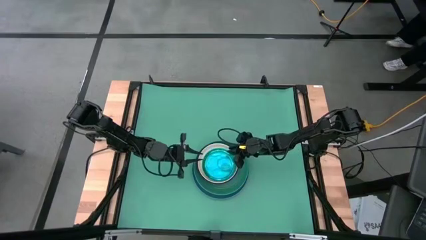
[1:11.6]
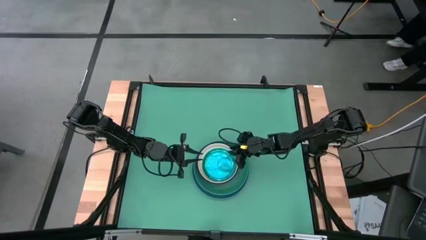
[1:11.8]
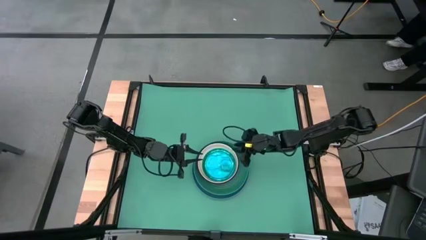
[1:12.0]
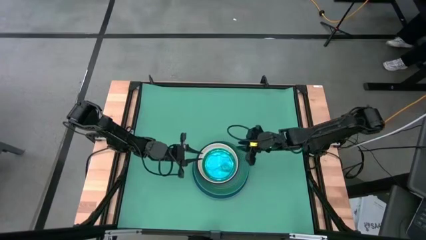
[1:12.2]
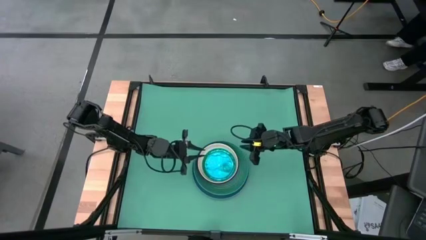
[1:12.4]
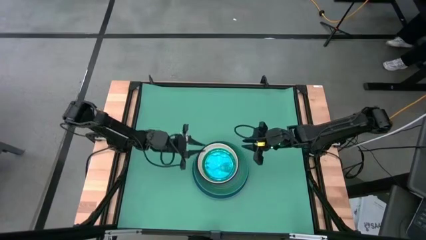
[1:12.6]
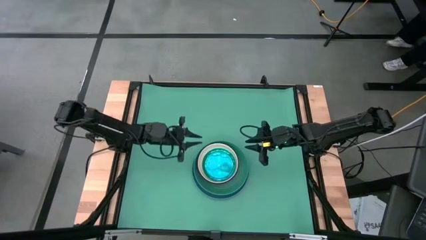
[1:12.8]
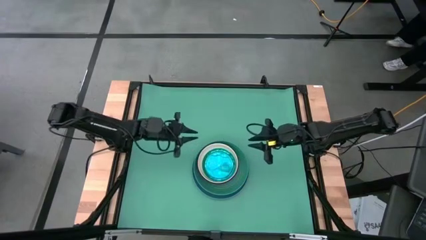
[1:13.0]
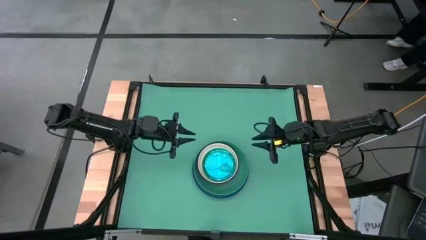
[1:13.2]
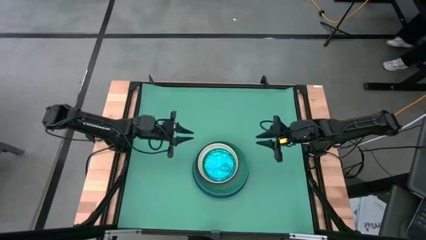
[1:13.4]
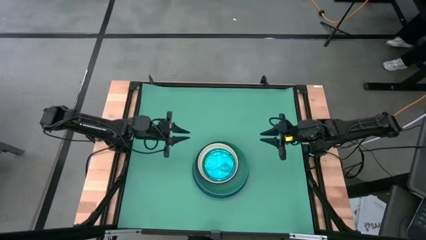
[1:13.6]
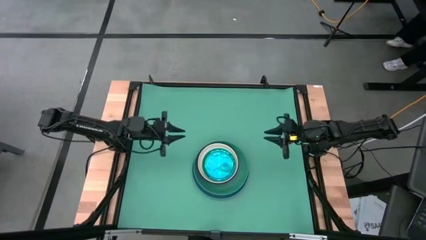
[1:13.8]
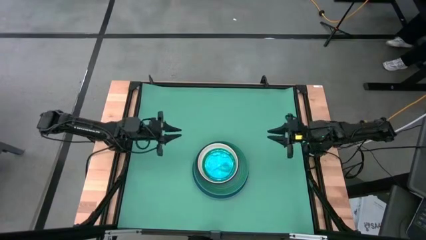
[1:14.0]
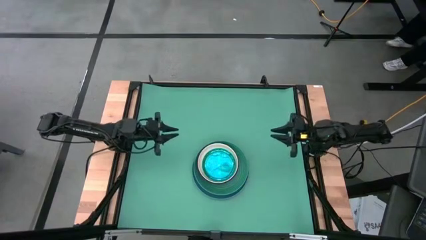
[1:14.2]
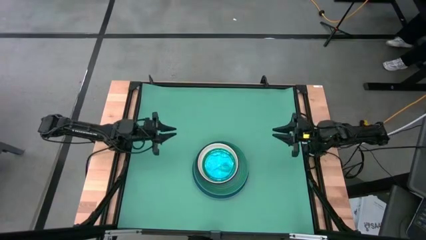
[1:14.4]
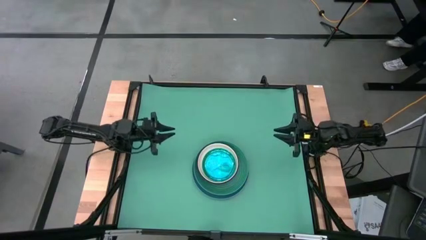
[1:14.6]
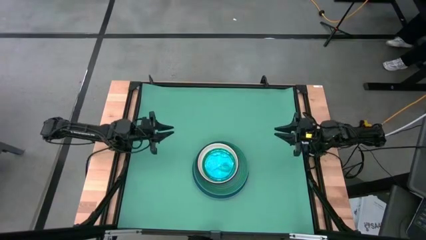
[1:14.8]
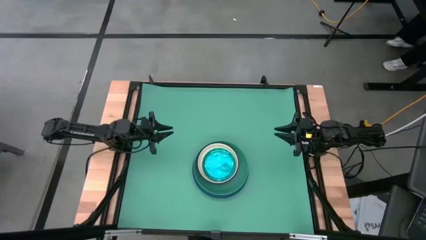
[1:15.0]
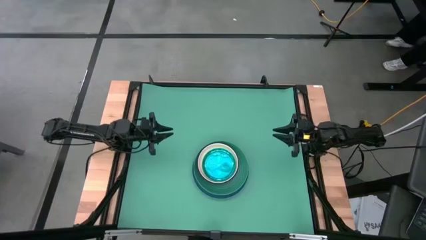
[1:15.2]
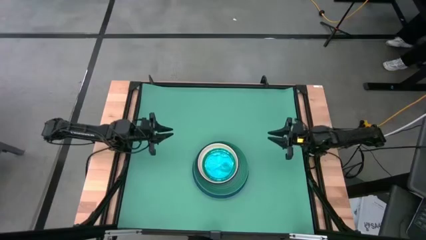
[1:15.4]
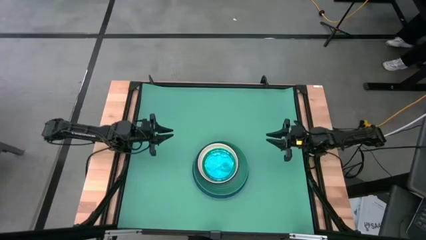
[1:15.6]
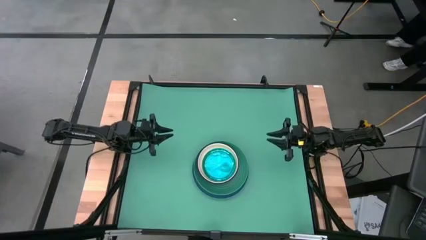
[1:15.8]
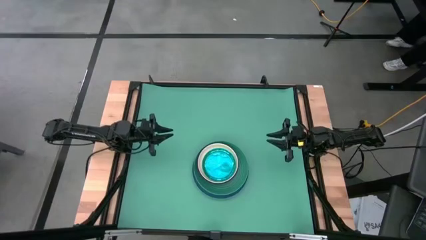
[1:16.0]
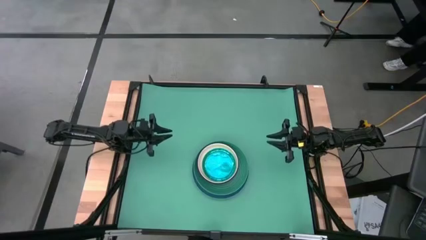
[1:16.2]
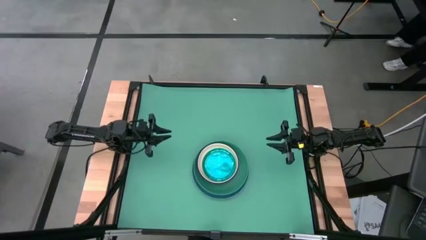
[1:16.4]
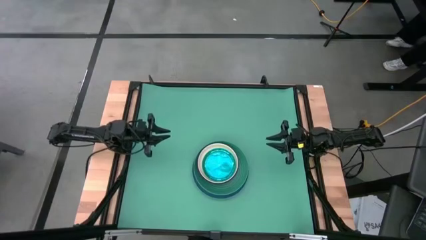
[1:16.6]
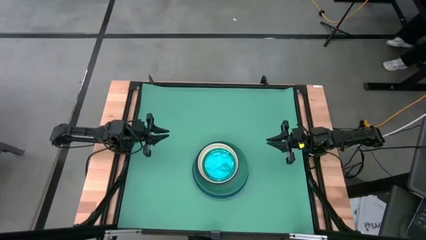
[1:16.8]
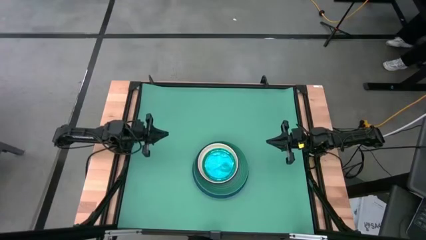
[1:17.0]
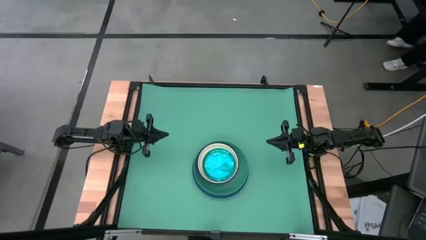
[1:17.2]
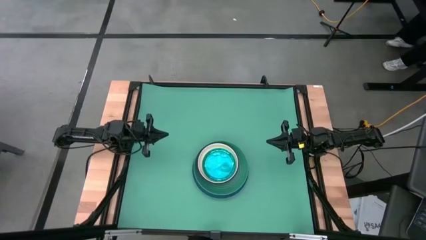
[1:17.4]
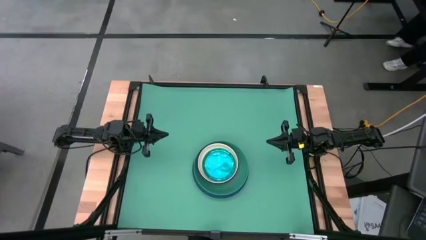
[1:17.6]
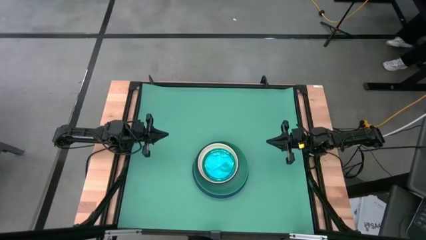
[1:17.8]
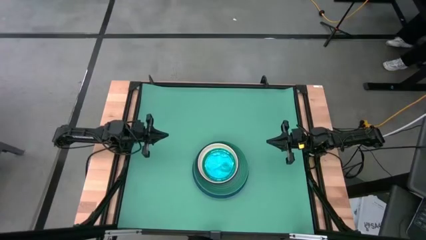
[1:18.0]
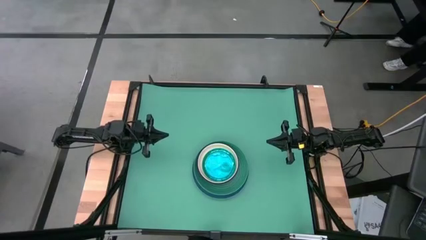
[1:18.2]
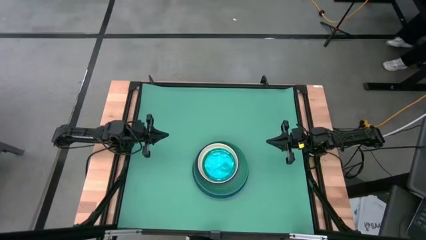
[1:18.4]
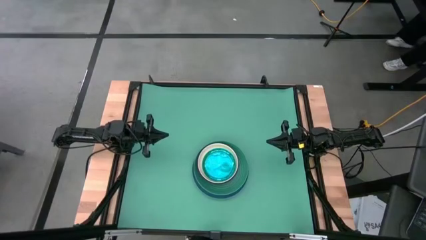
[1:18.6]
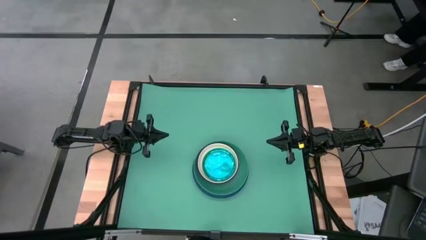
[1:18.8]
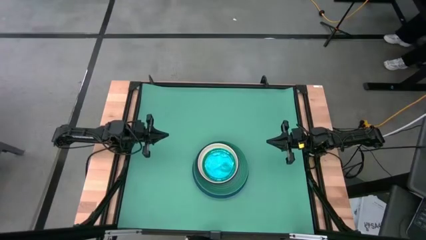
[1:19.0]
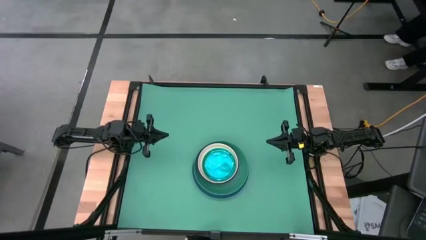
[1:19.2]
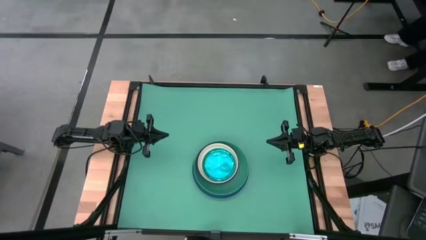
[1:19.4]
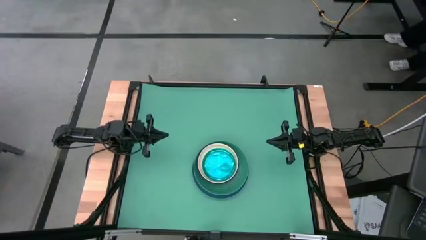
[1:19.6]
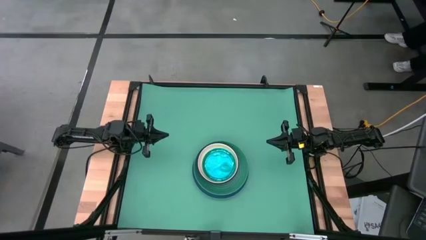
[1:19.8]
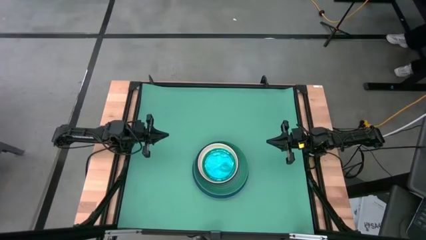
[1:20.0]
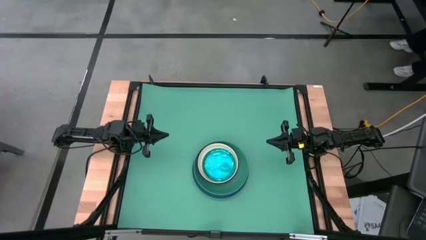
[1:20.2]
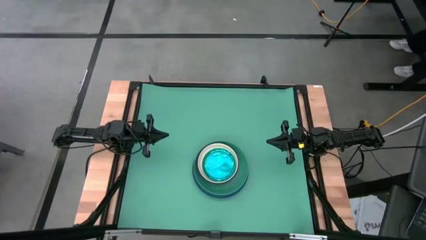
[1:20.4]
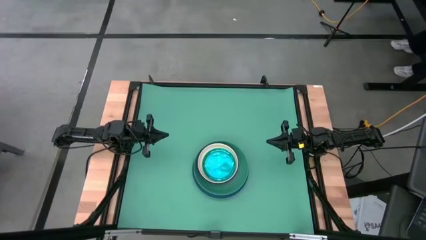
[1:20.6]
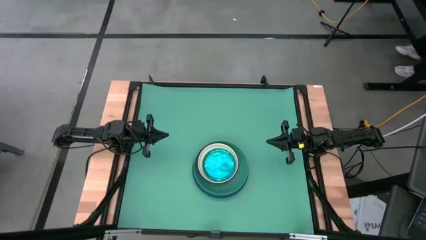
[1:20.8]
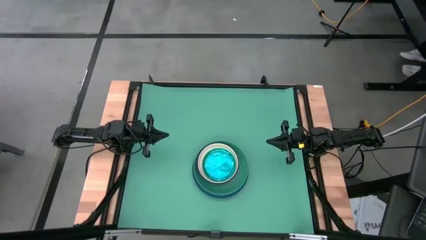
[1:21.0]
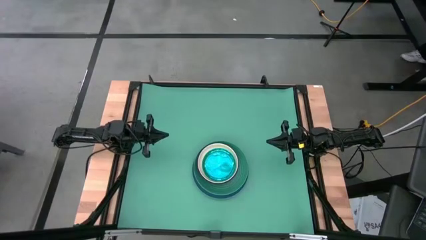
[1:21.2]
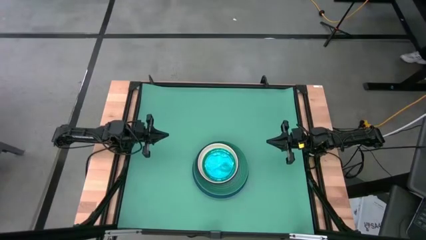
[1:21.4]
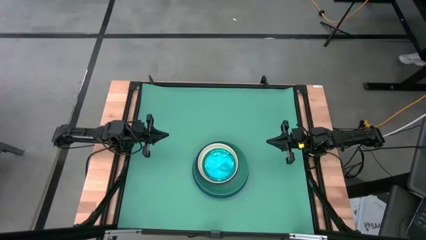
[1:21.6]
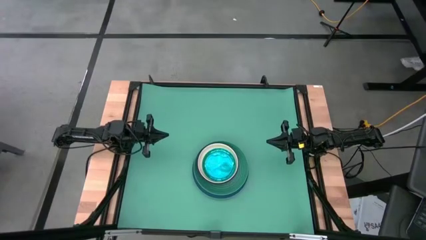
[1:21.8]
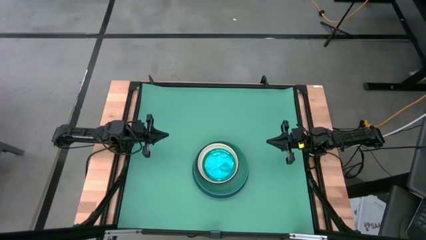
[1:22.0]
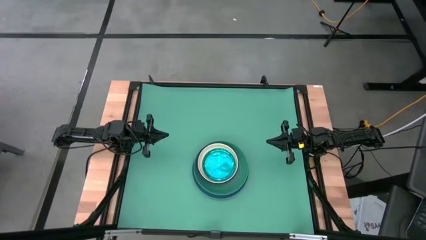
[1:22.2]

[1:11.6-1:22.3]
Task: Stack plastic plates
Return to Home Position
